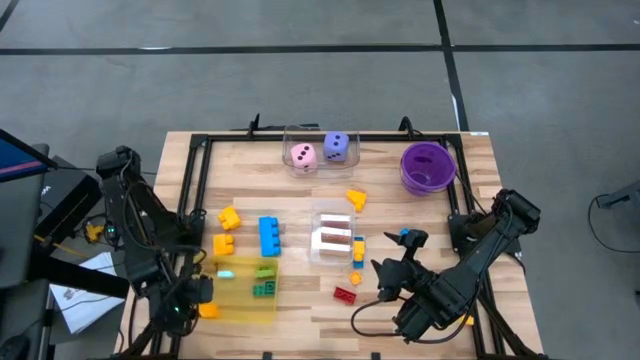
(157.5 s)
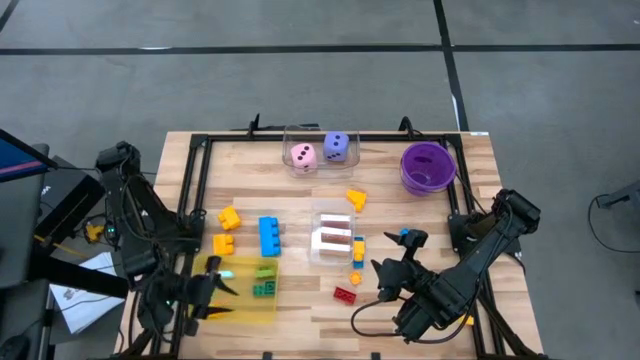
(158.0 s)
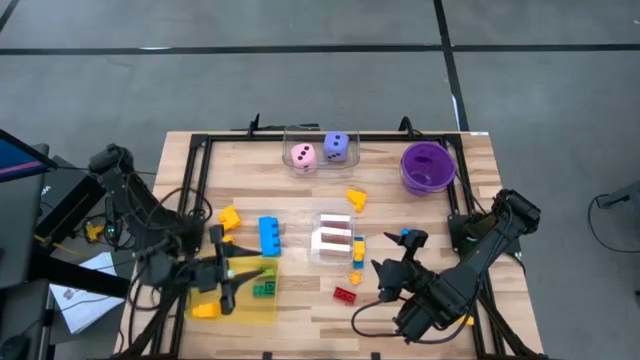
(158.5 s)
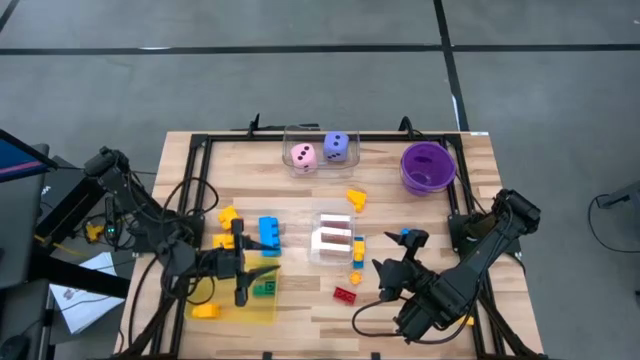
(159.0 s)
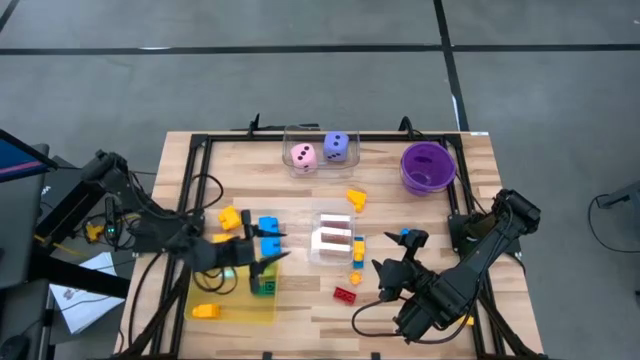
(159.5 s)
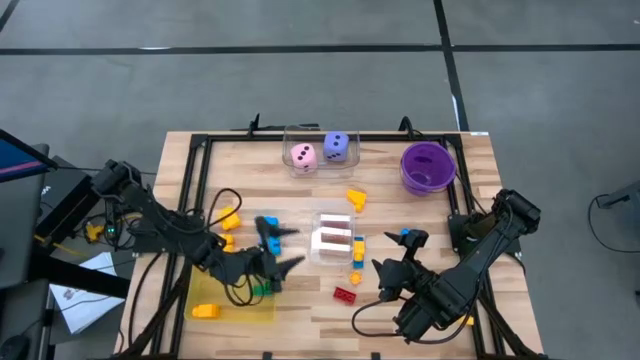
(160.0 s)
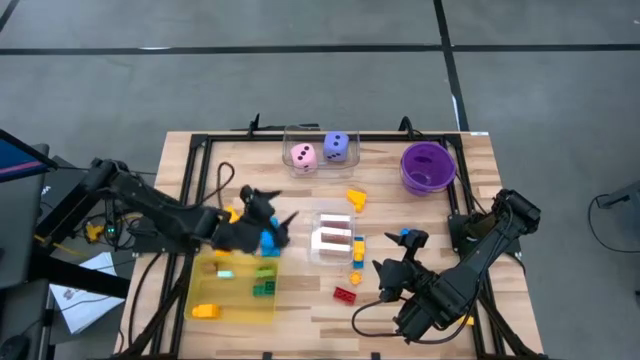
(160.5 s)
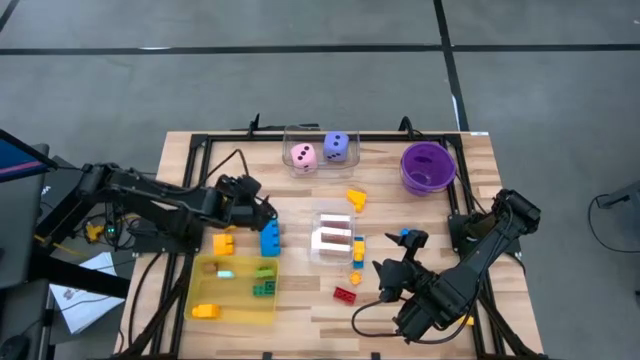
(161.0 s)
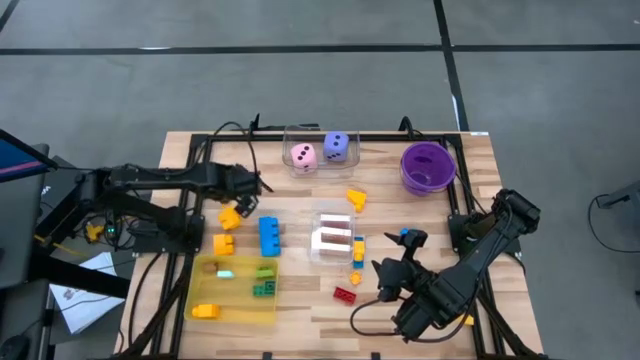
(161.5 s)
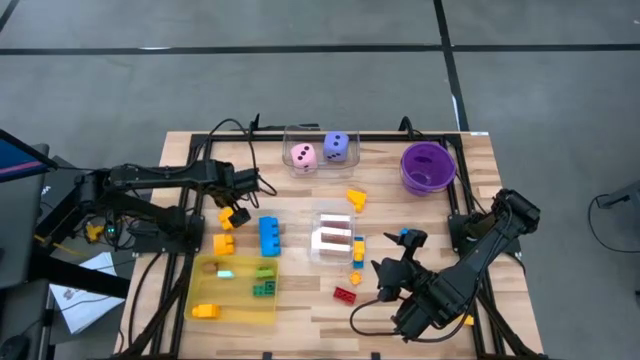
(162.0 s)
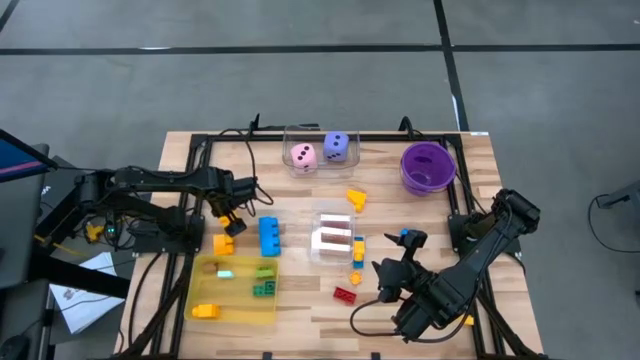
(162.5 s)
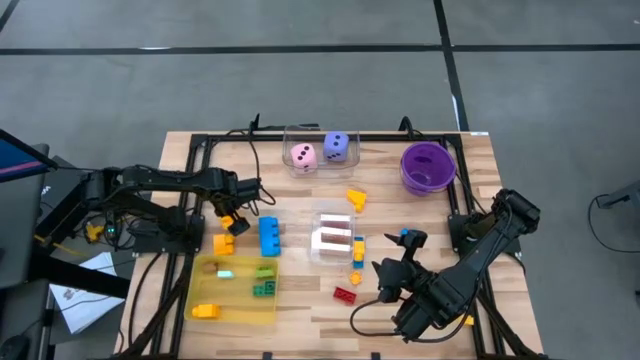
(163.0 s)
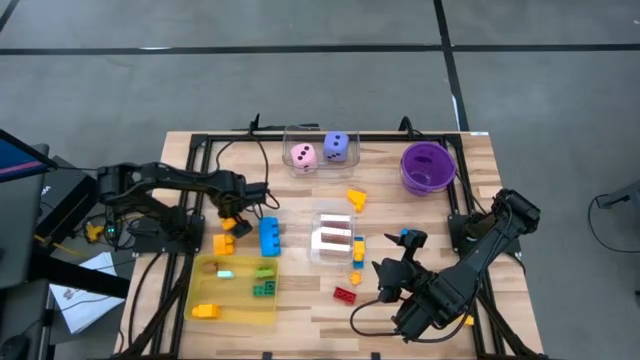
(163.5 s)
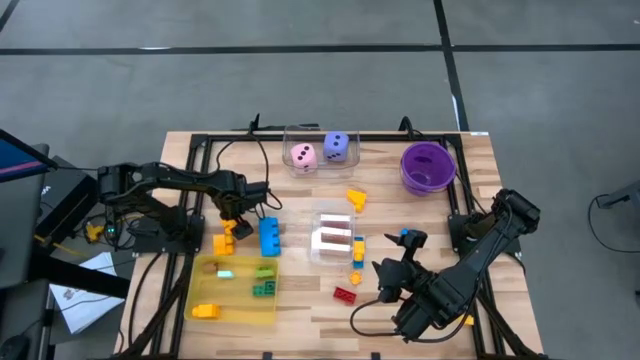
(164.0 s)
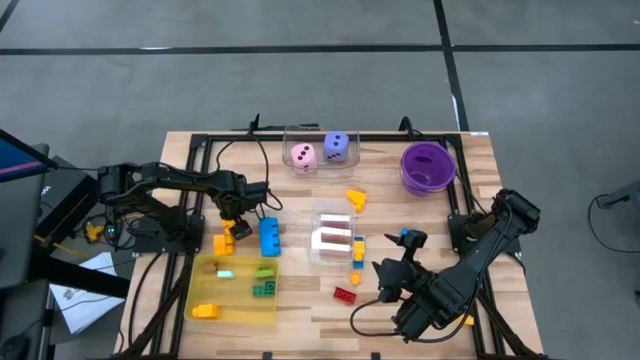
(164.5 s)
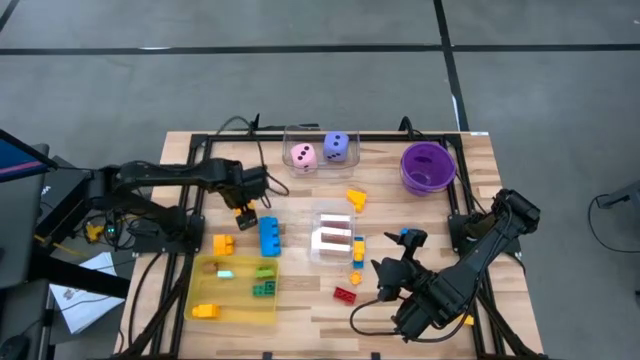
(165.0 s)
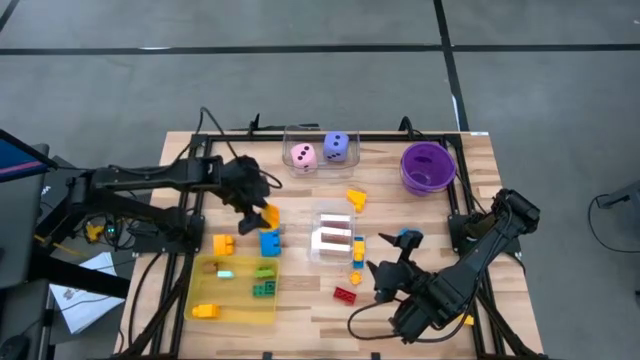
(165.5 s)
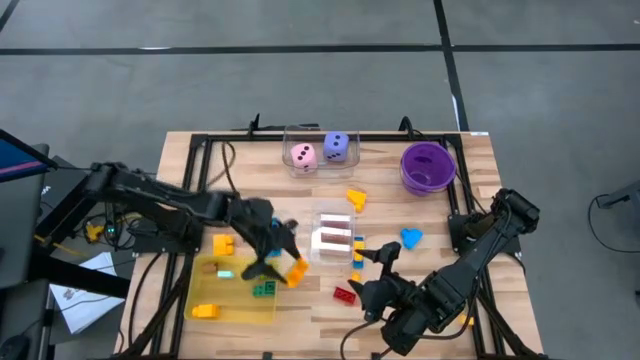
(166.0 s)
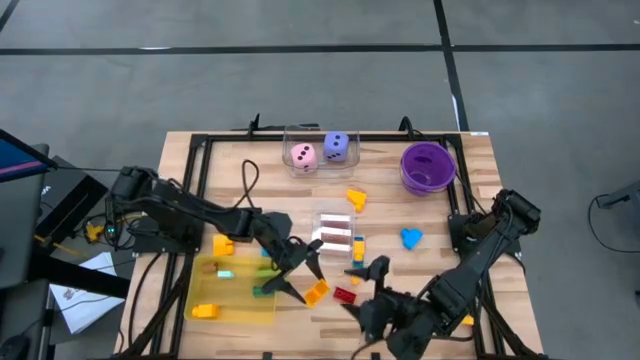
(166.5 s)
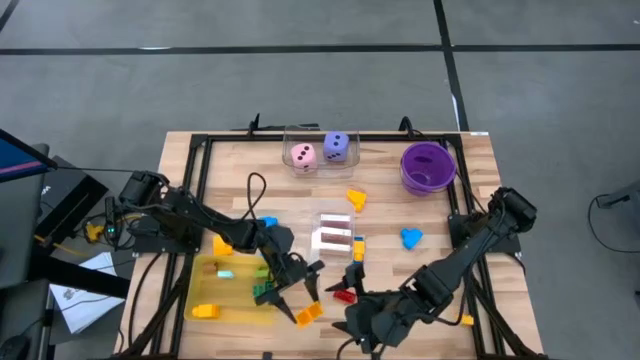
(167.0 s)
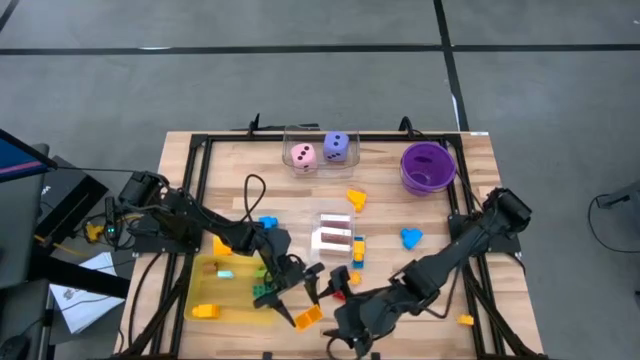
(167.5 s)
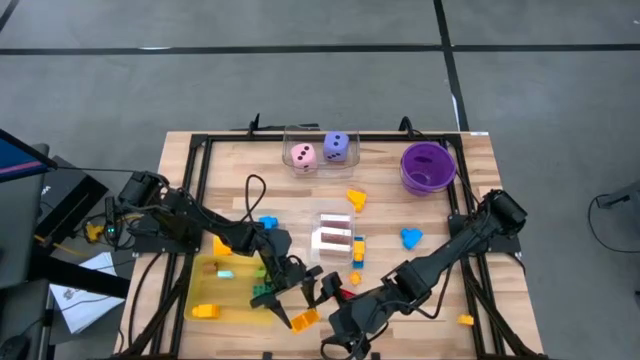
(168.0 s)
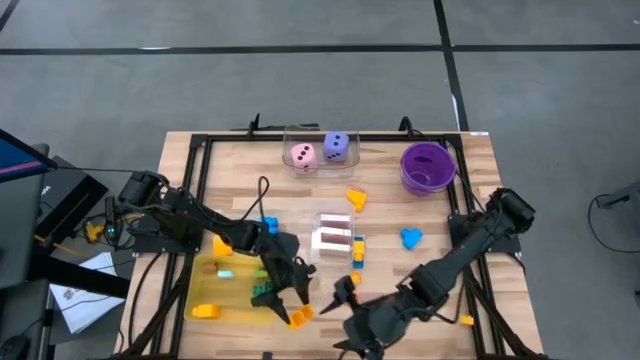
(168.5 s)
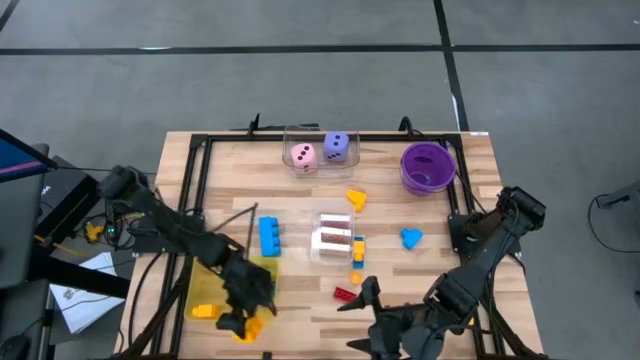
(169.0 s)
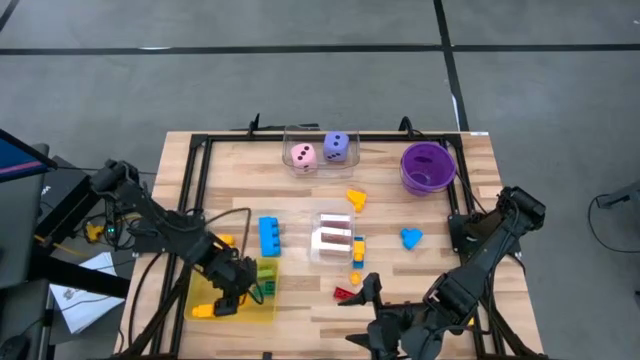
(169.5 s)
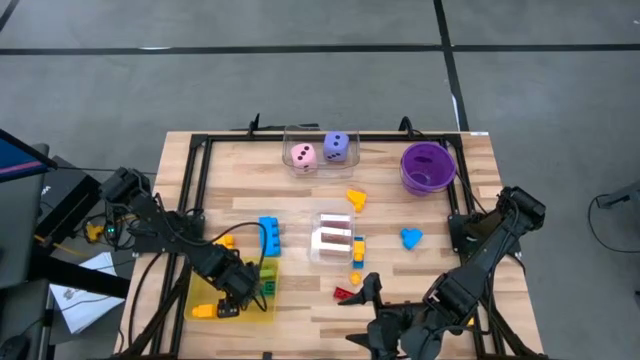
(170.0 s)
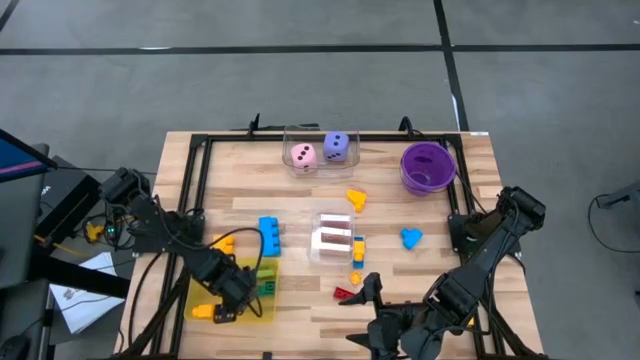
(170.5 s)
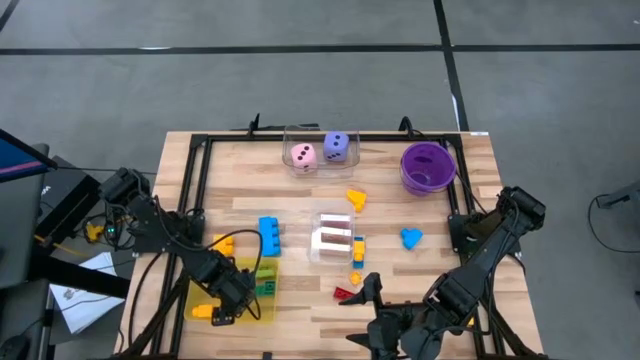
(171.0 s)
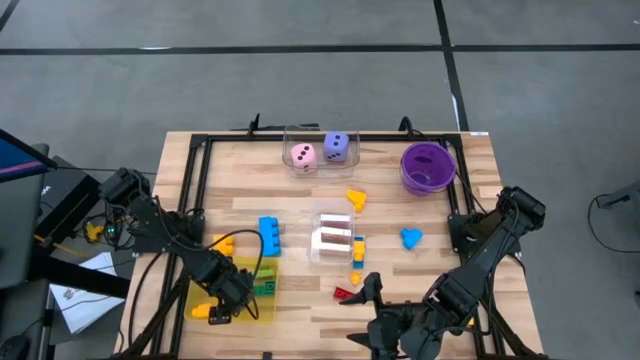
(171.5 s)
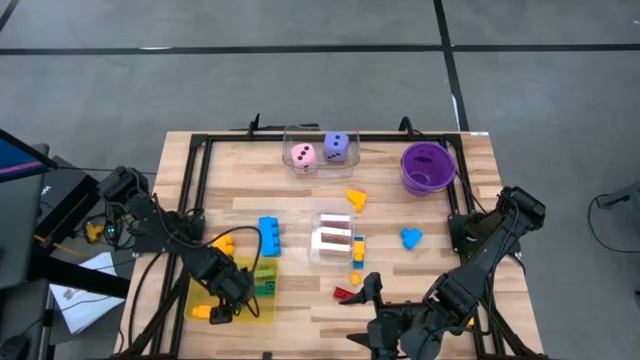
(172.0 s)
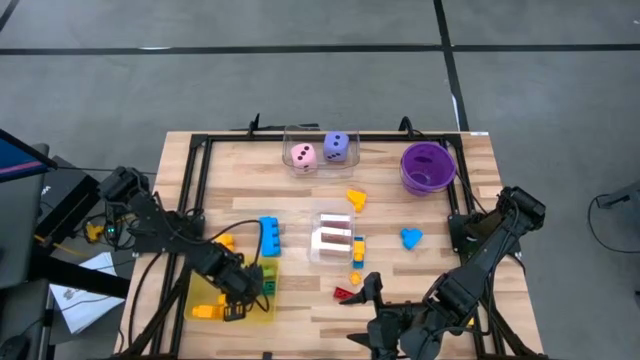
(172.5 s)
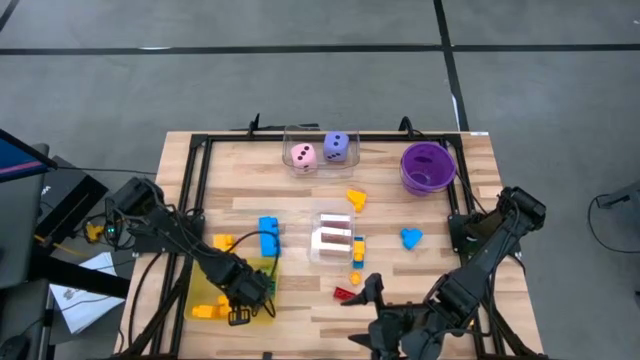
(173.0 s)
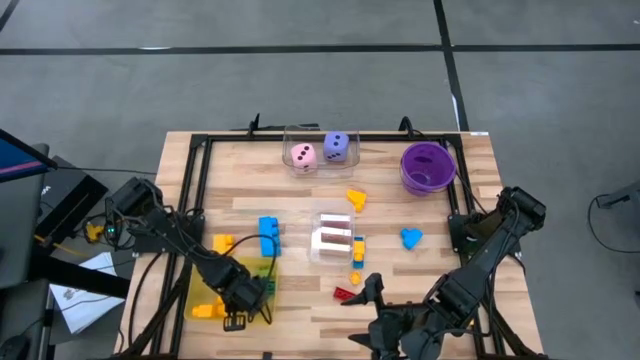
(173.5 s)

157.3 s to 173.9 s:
Task: Pick & Place Toys
Put the yellow game piece into the yellow bin

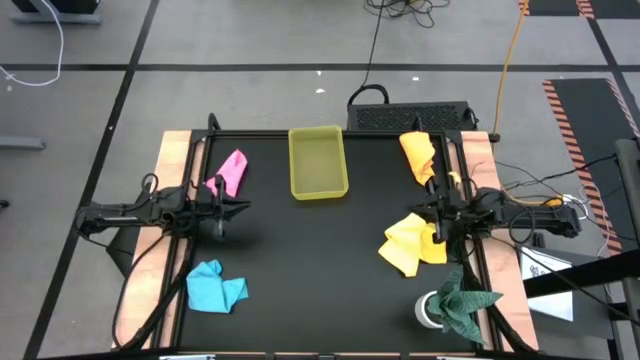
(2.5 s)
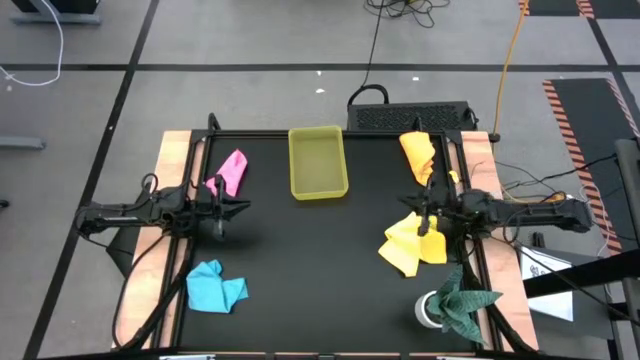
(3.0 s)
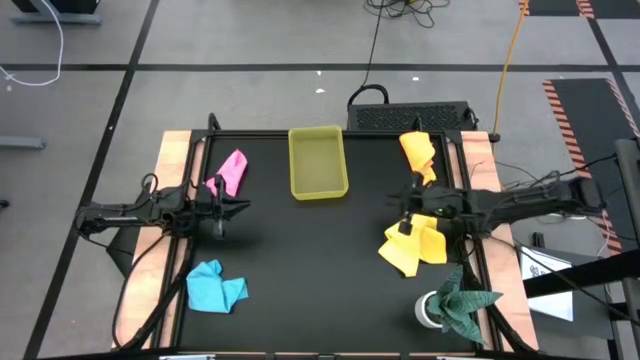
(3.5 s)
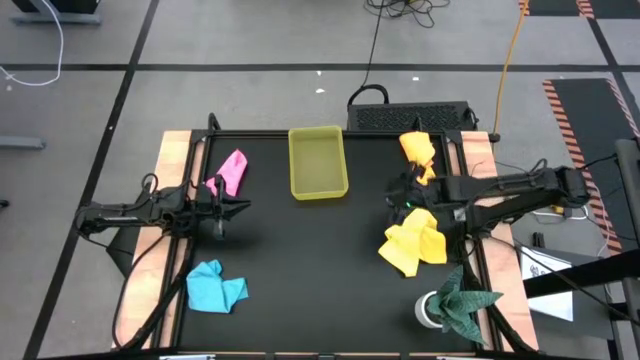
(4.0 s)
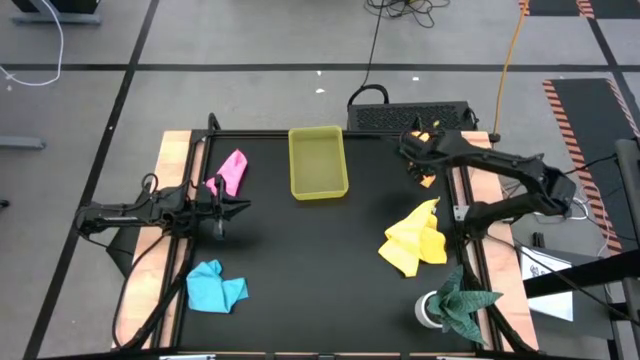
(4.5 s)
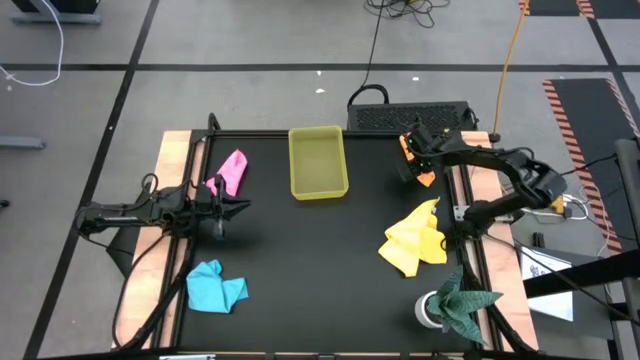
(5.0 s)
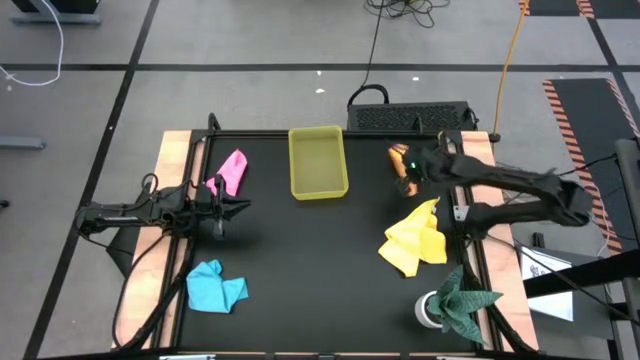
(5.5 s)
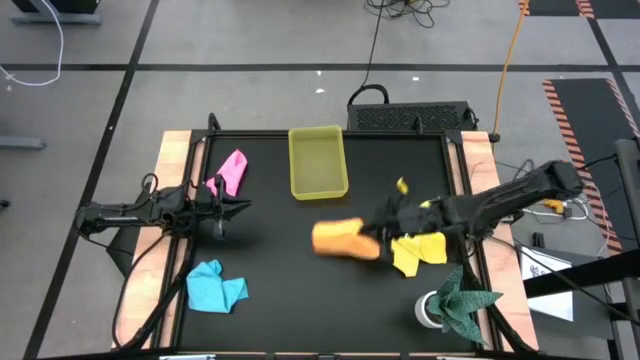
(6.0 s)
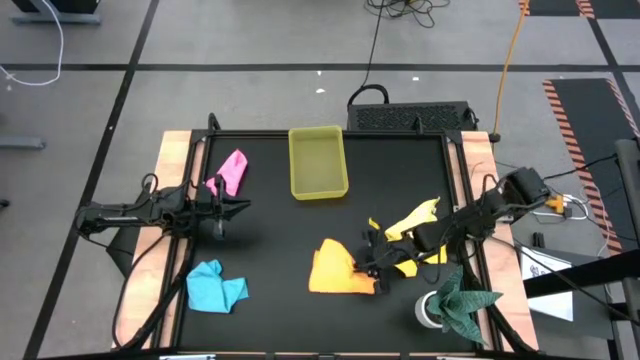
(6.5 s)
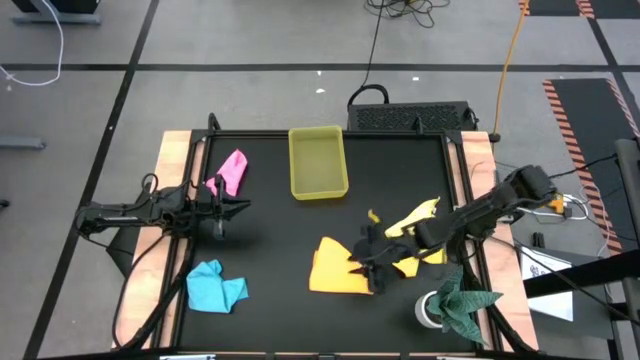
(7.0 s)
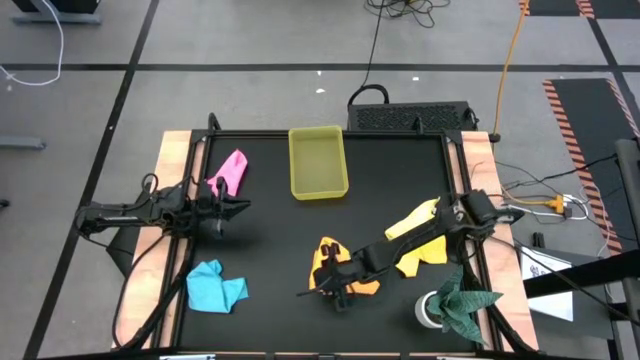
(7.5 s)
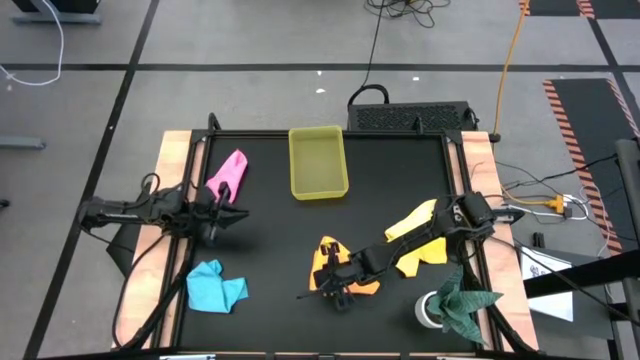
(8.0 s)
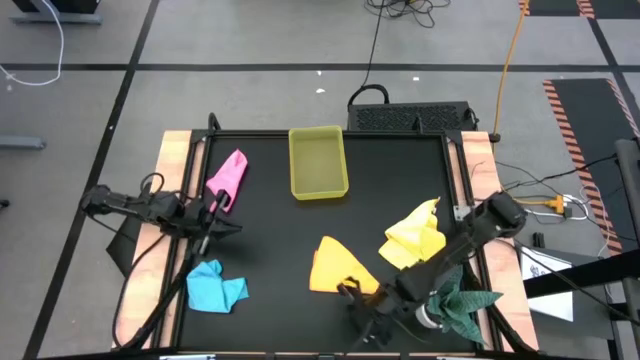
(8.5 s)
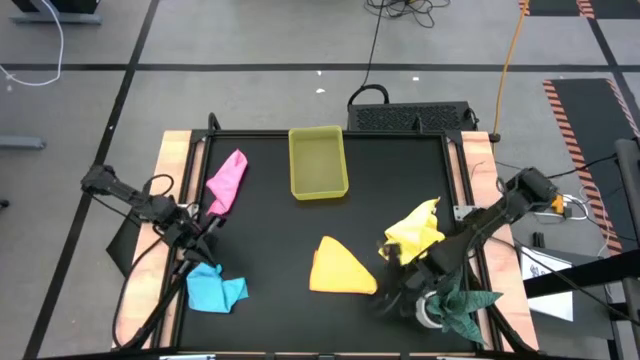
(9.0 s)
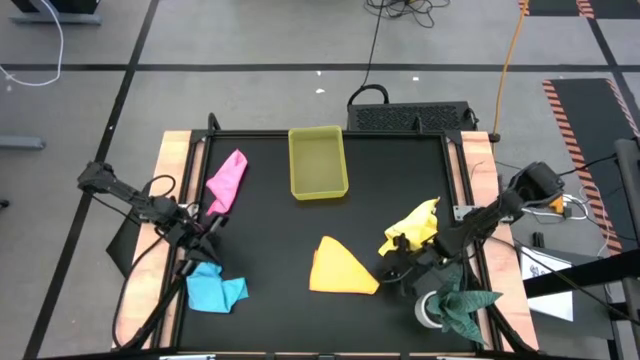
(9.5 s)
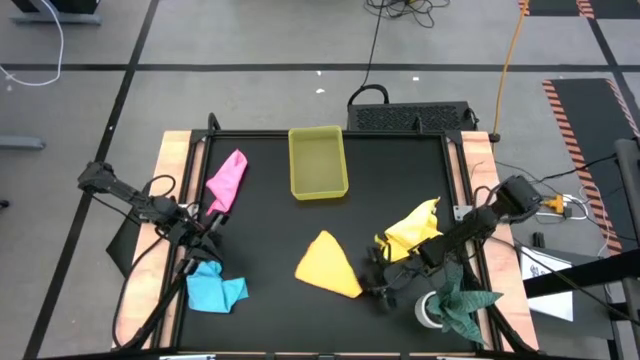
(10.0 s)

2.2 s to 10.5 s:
Task: Fold microfiber towels
Move the orange towel to the center of the table
